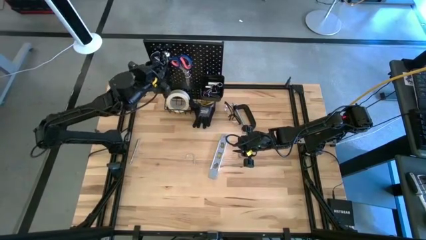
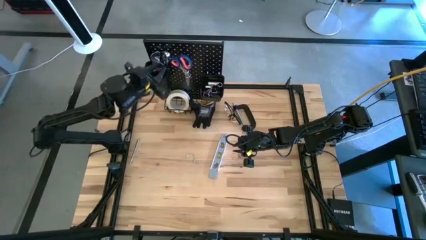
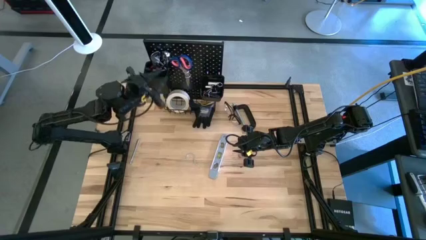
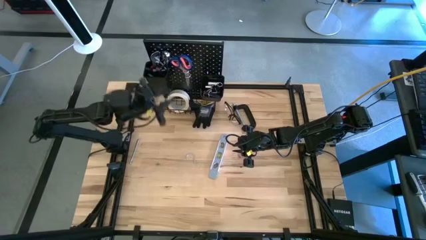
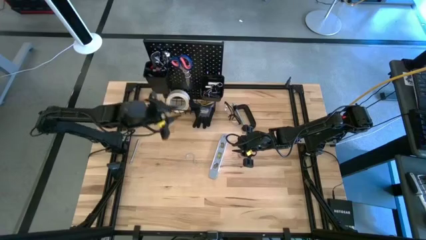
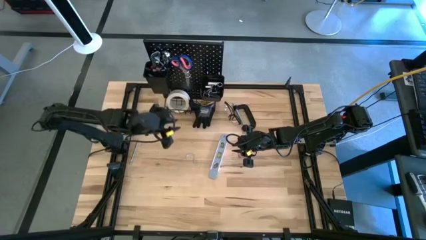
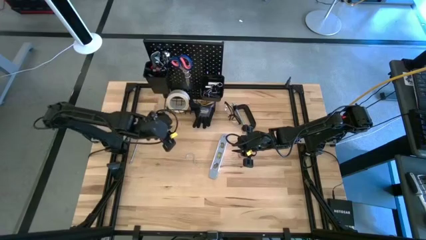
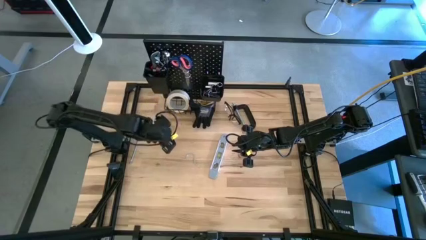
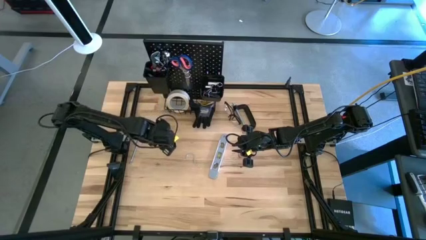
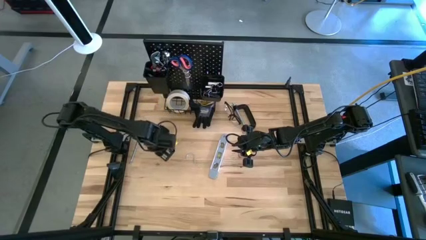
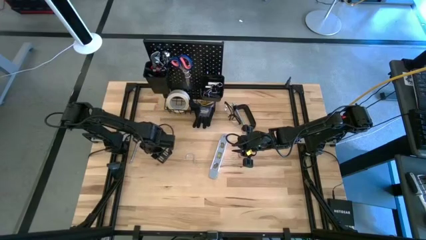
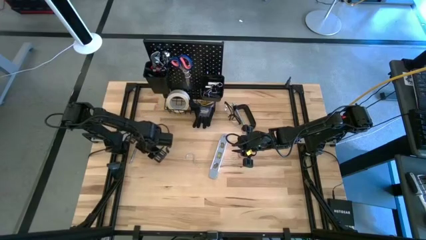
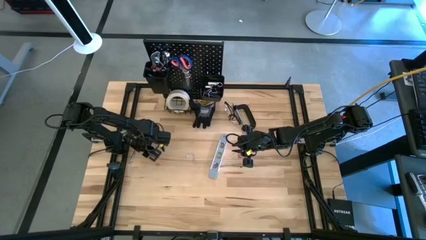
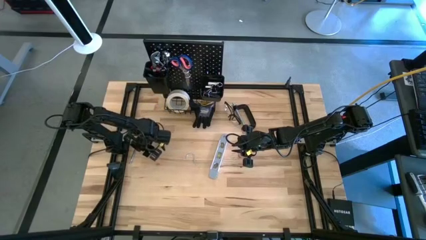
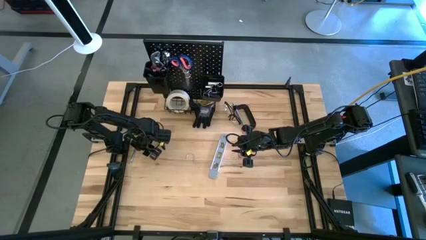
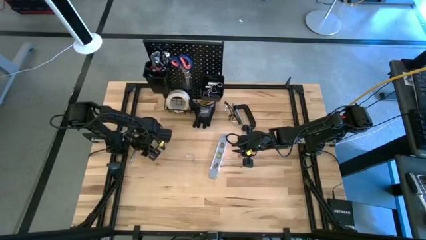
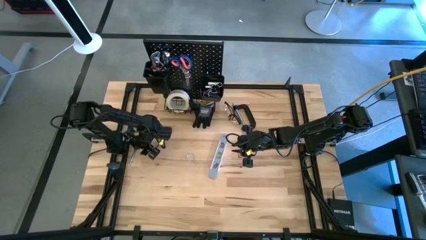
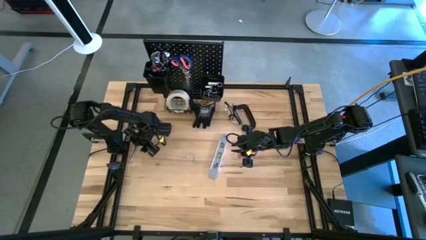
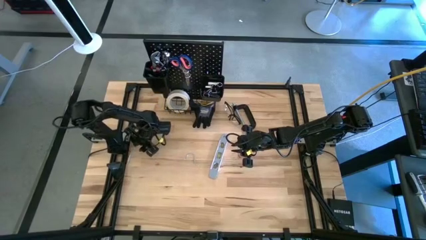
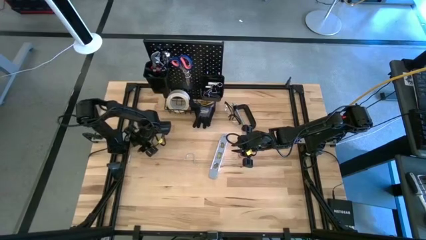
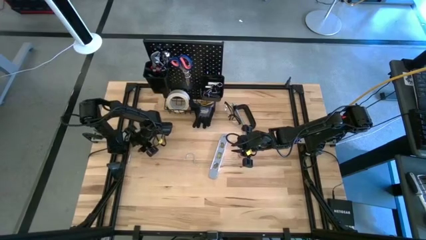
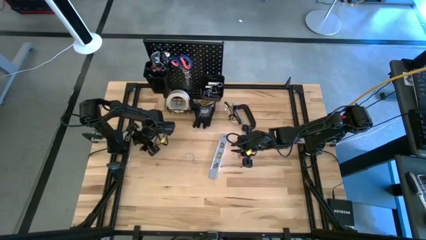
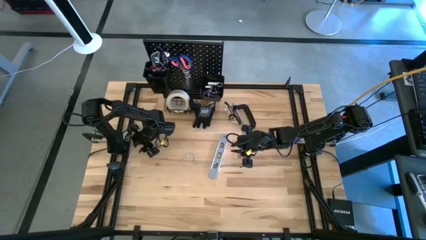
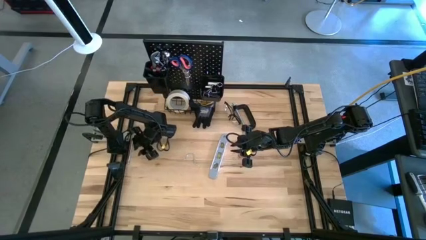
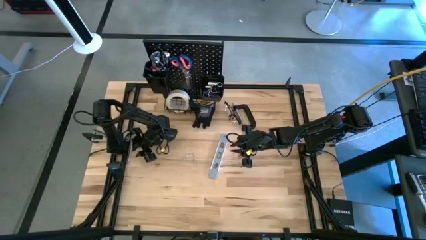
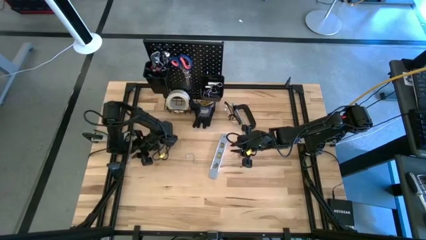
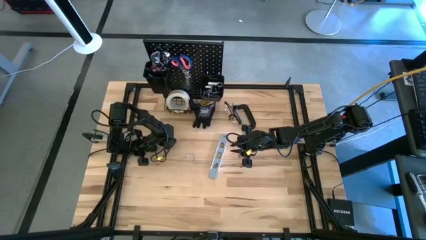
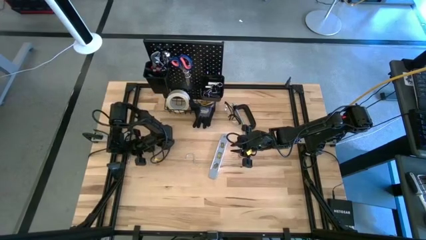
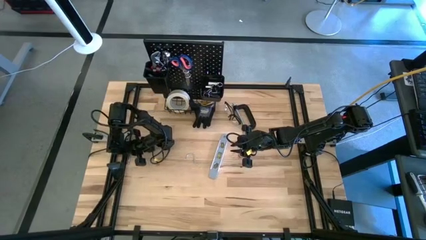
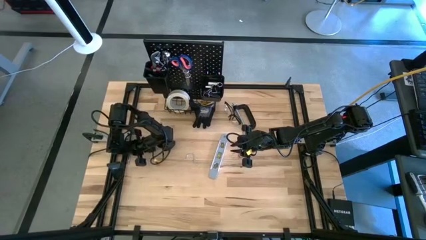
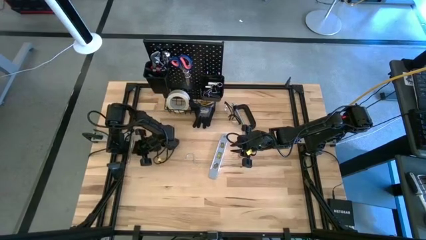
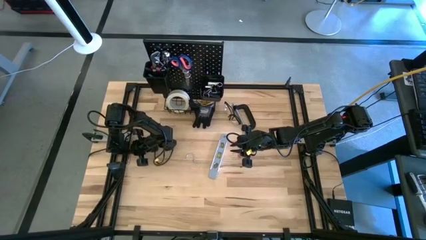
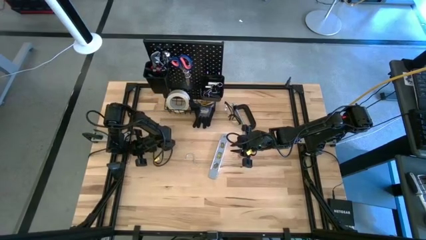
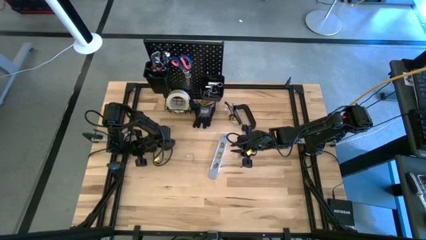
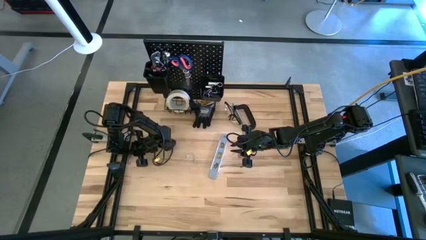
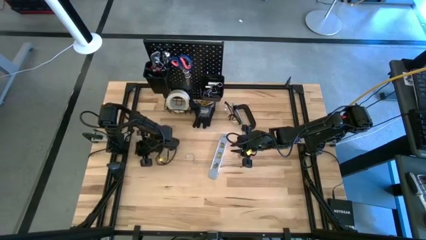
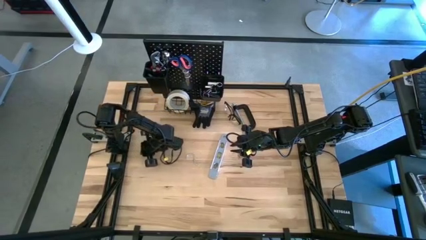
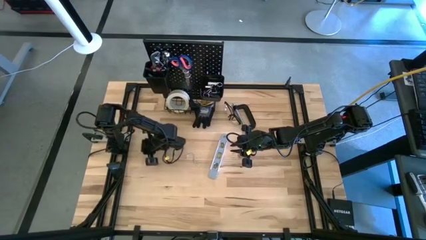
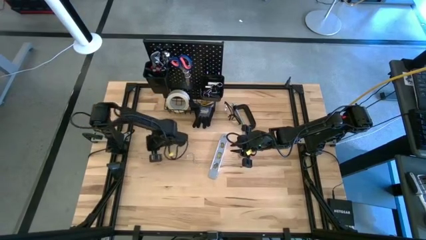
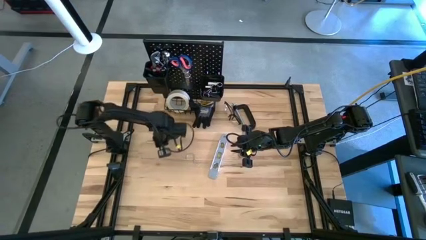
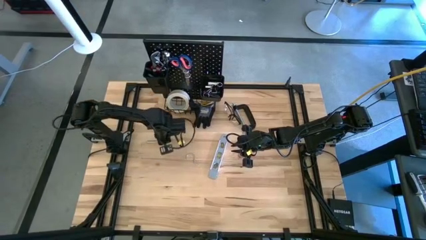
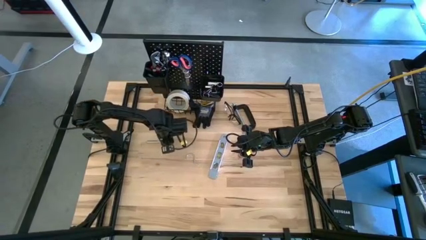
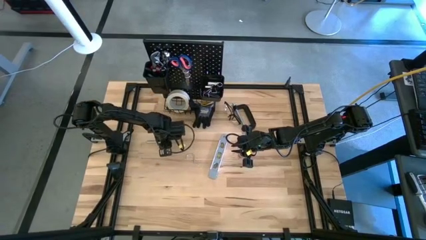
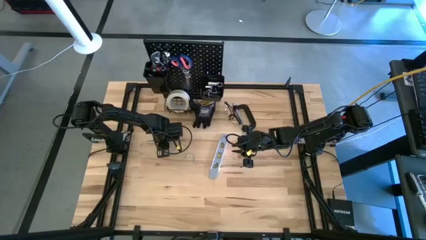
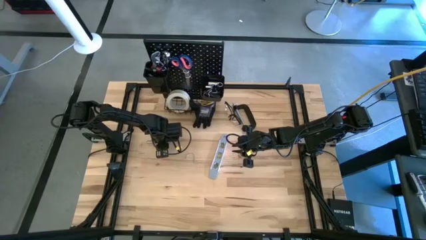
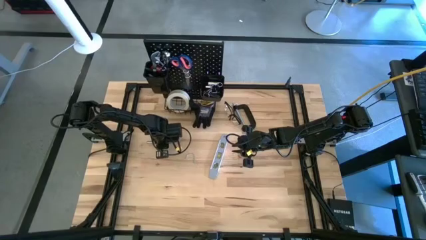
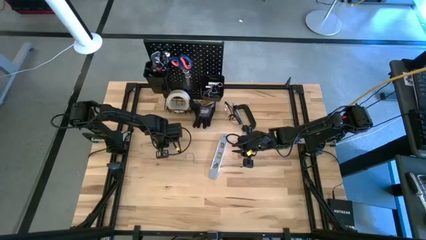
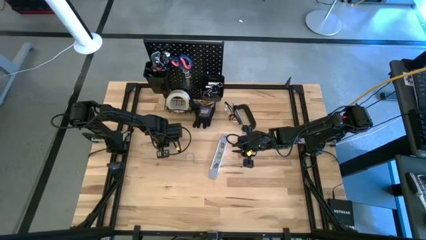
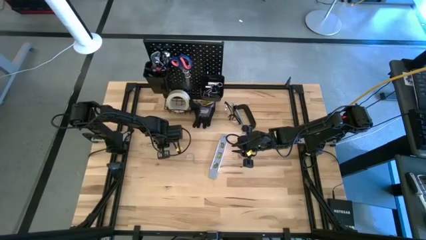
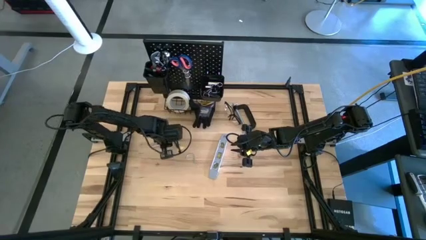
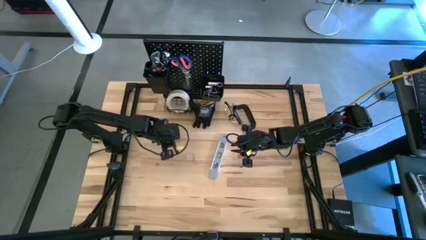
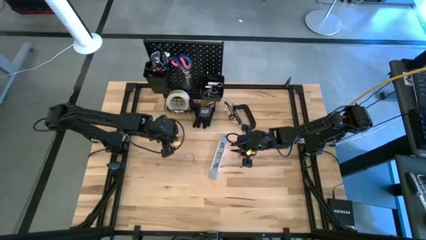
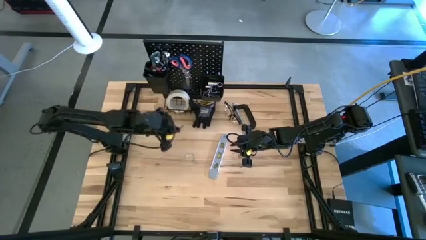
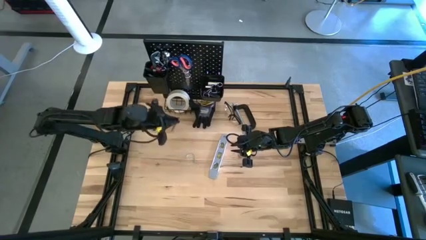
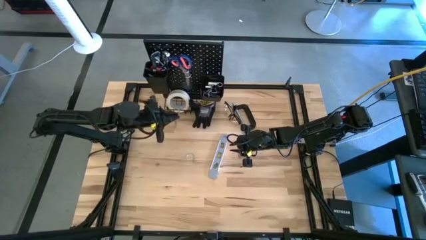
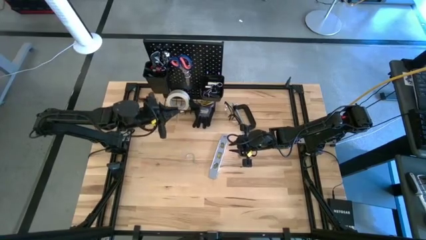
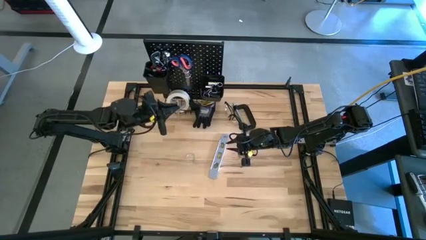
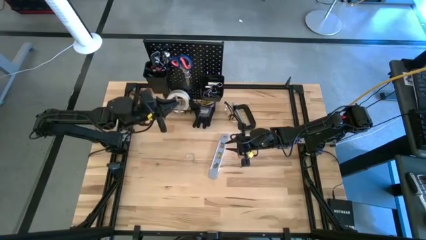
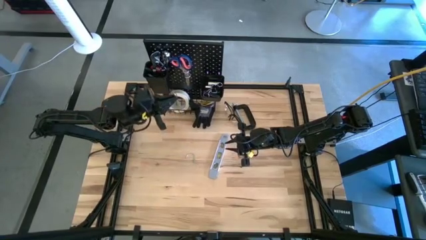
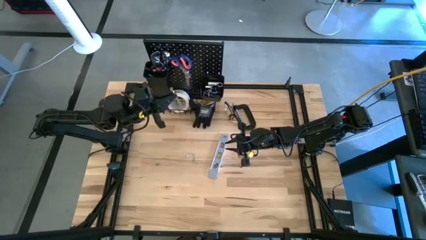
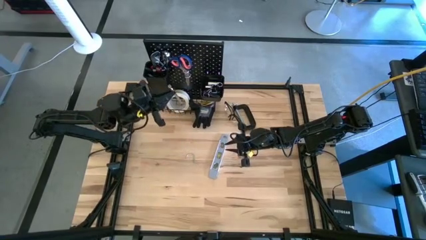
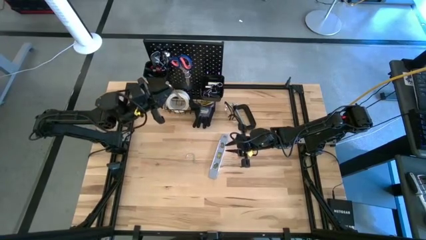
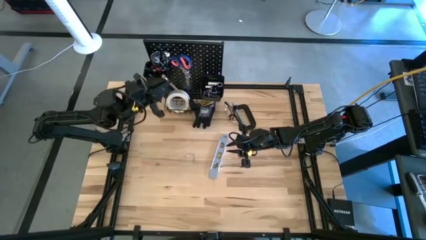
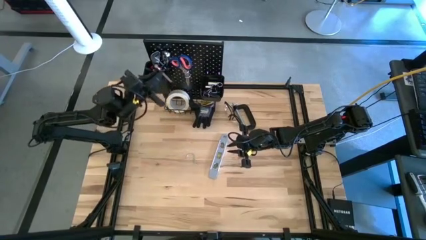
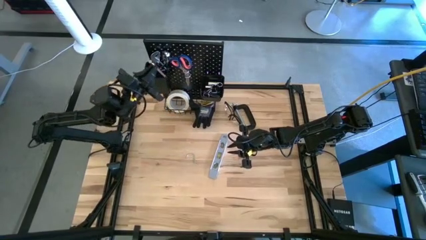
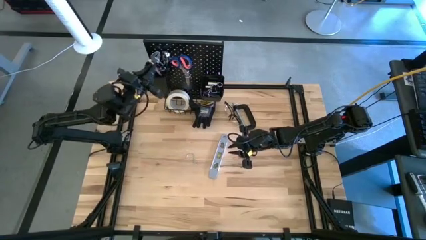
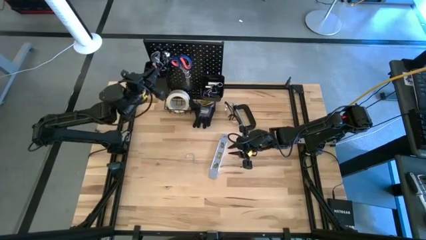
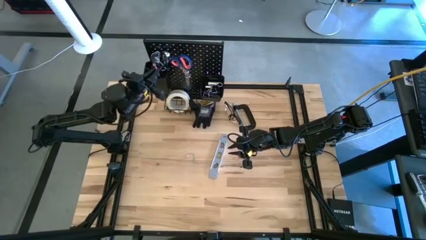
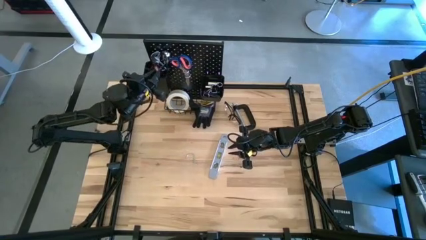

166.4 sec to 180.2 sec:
Task: Hang tools onto peg board
Put the telescopic magnetic pen into the left black bin on the pegboard

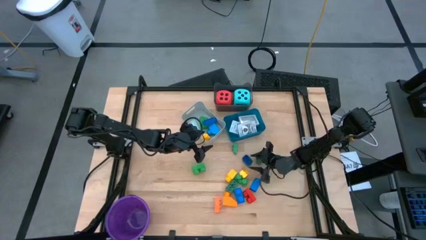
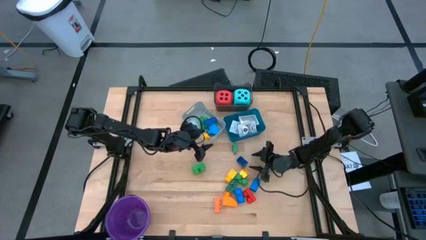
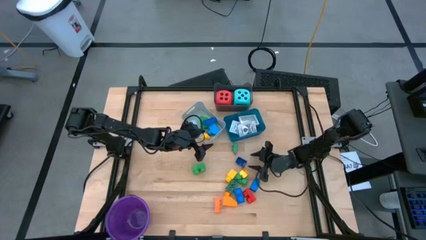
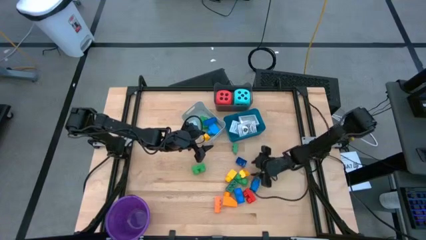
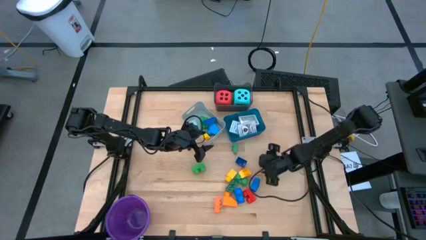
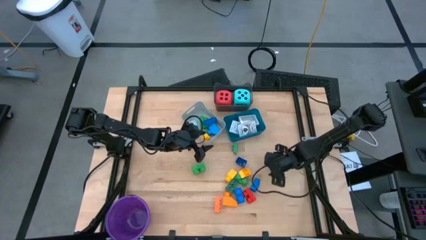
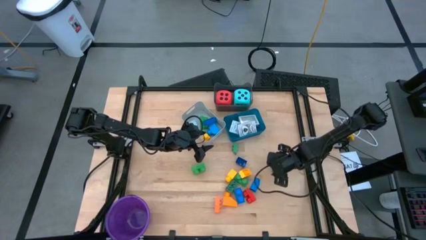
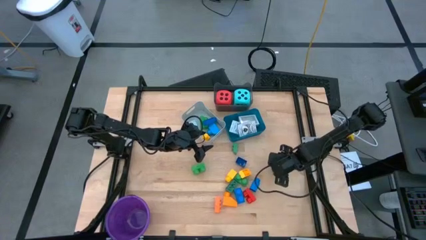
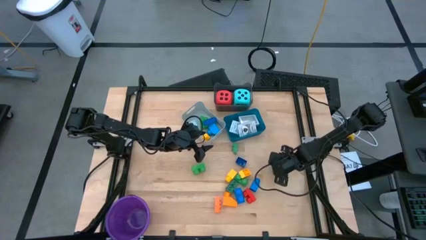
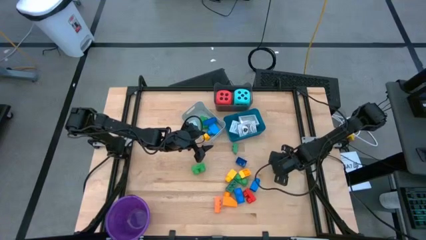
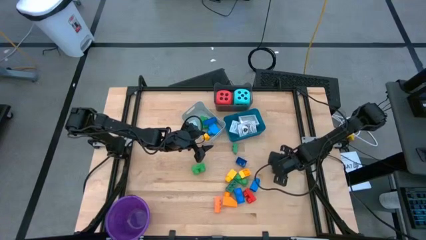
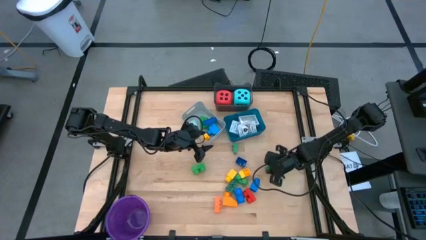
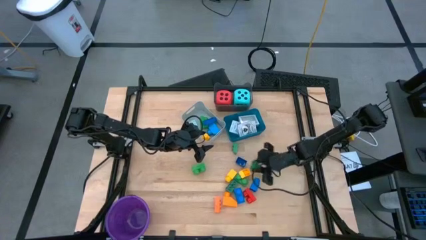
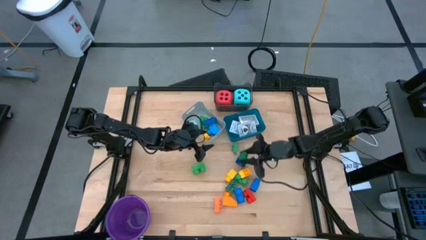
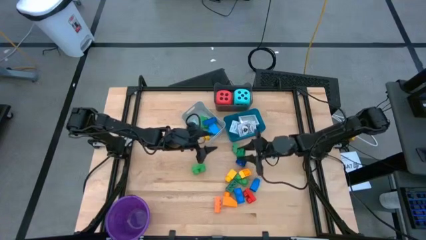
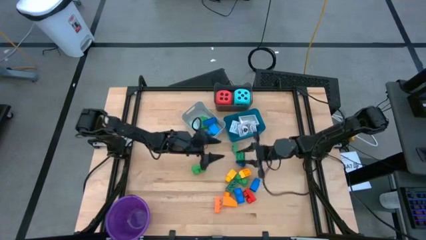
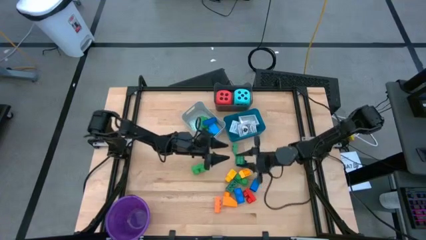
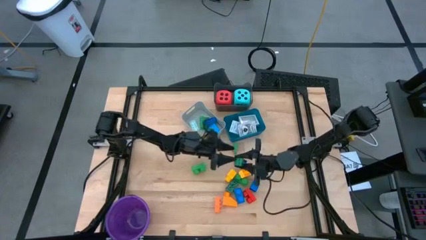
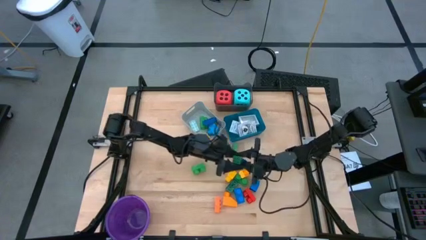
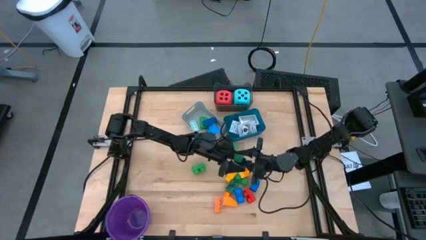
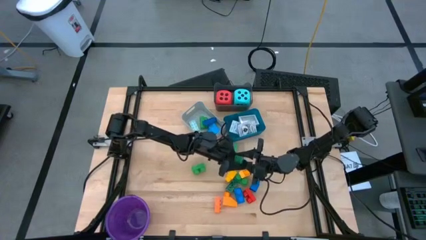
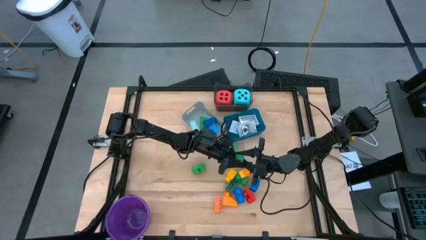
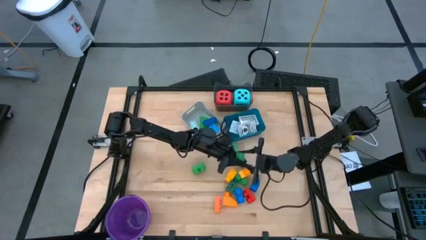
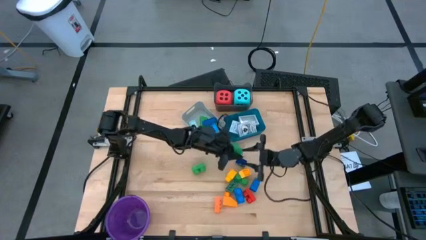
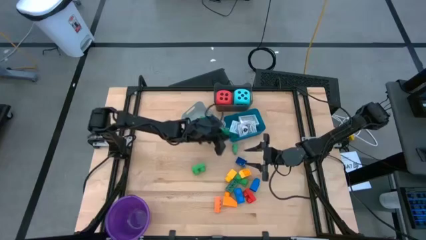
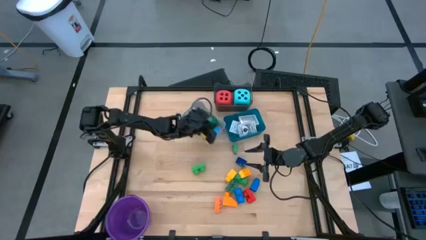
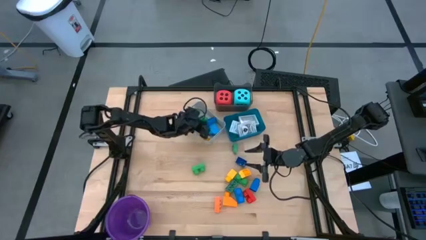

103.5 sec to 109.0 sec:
Task: Pick & Place Toys
Put the green game piece into the gray bin
